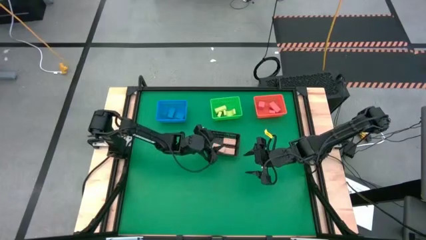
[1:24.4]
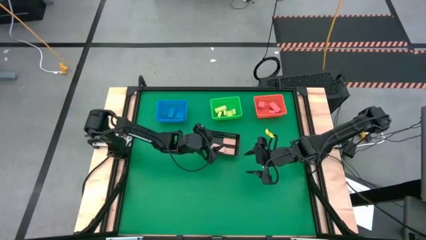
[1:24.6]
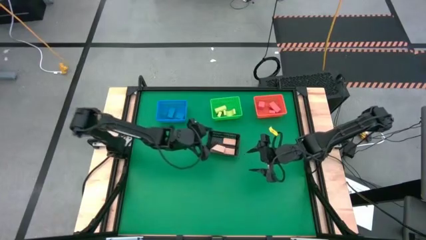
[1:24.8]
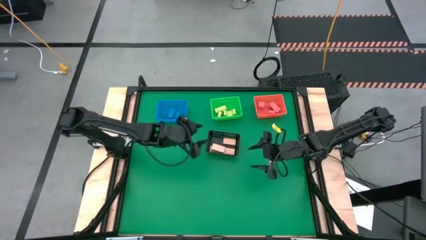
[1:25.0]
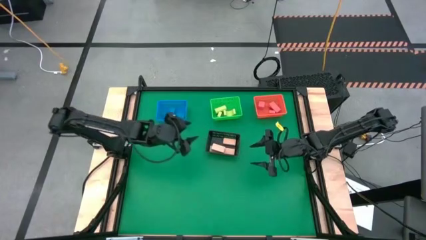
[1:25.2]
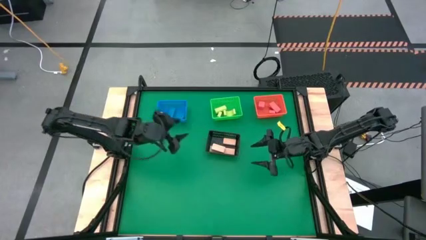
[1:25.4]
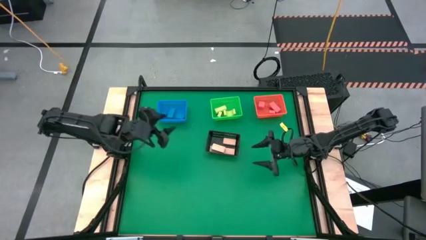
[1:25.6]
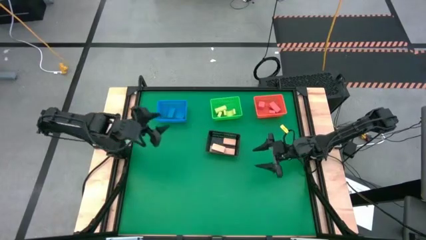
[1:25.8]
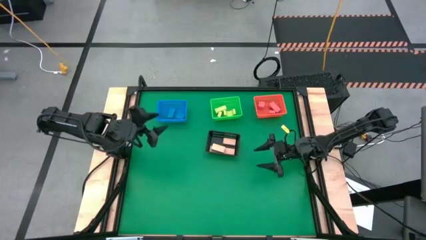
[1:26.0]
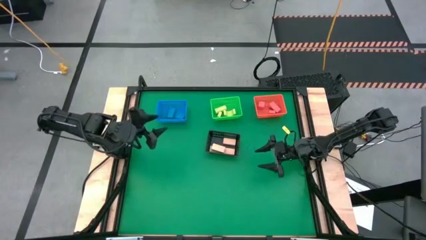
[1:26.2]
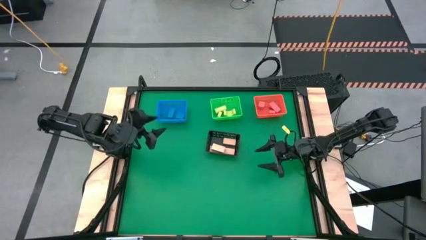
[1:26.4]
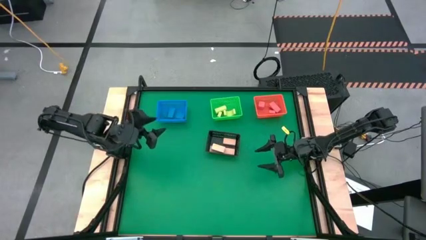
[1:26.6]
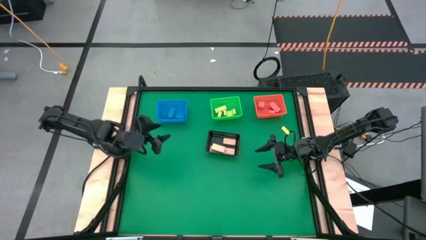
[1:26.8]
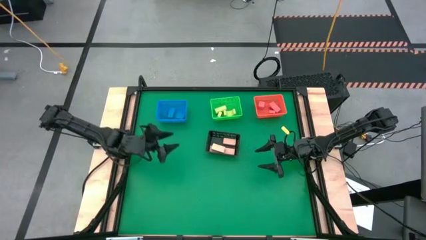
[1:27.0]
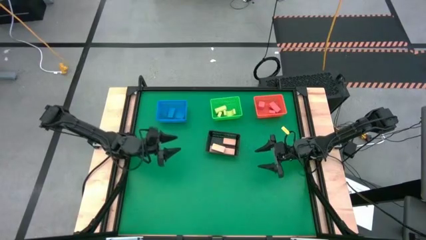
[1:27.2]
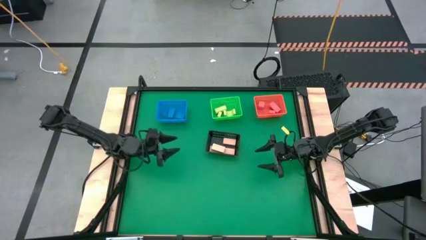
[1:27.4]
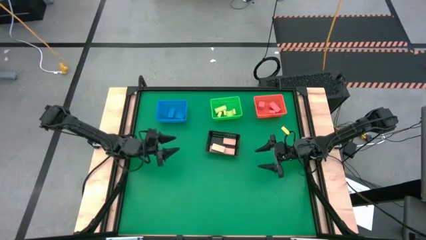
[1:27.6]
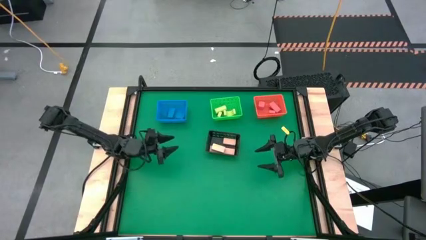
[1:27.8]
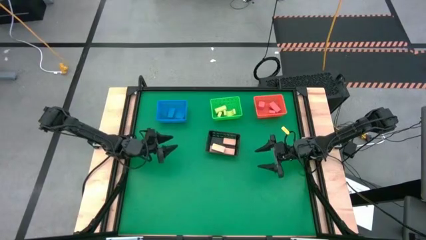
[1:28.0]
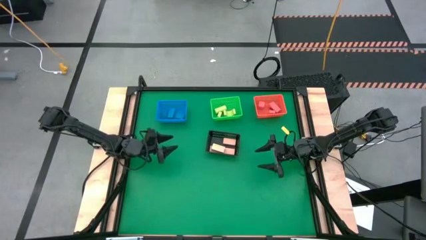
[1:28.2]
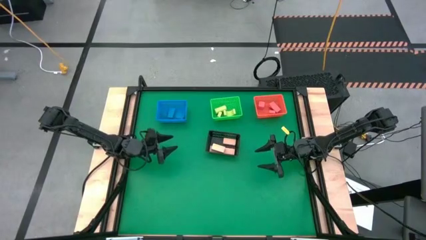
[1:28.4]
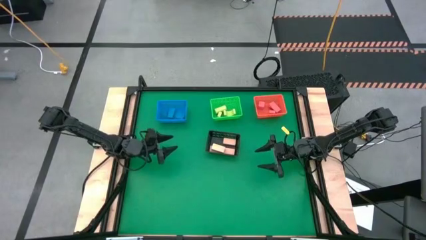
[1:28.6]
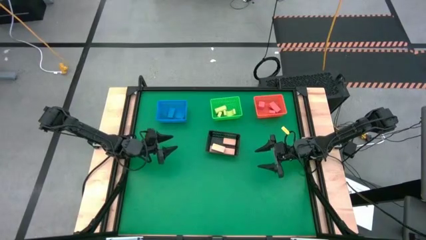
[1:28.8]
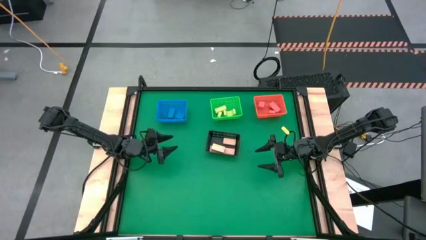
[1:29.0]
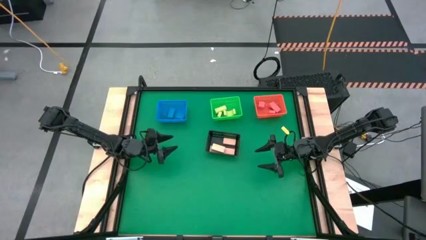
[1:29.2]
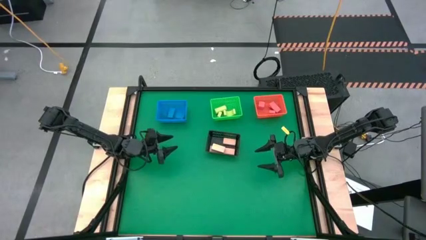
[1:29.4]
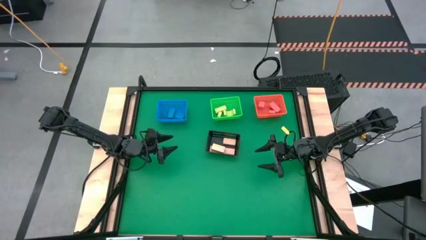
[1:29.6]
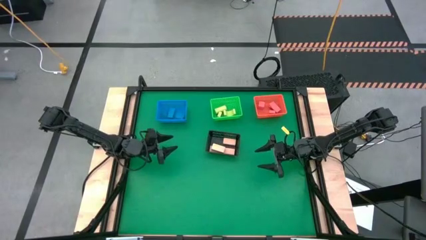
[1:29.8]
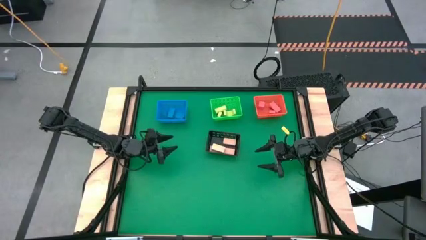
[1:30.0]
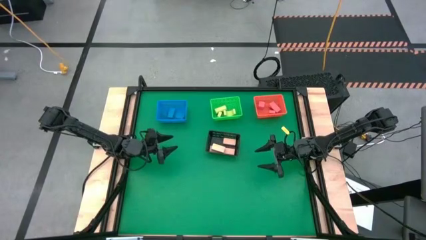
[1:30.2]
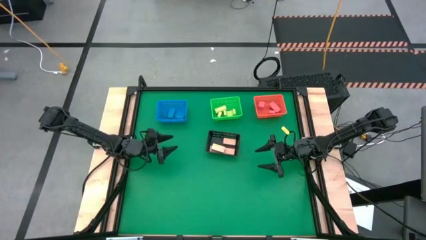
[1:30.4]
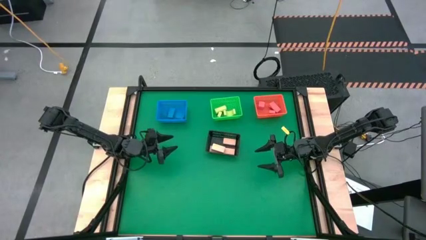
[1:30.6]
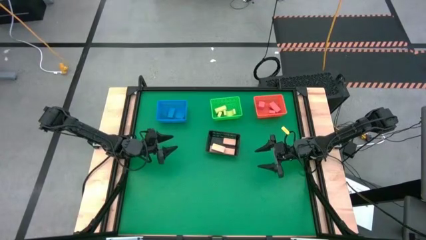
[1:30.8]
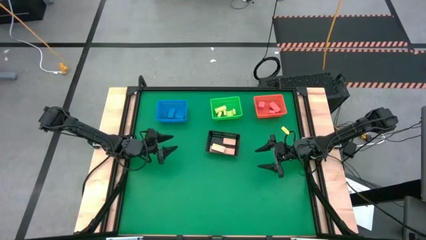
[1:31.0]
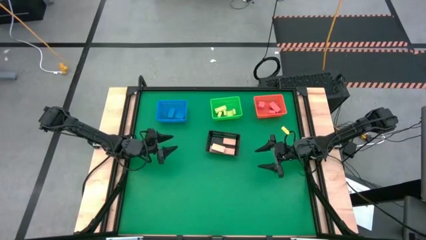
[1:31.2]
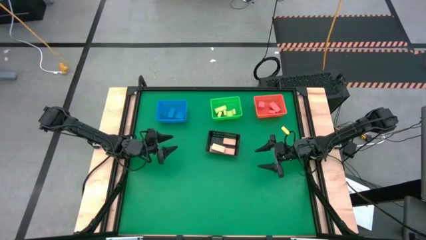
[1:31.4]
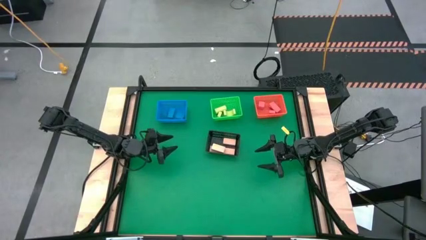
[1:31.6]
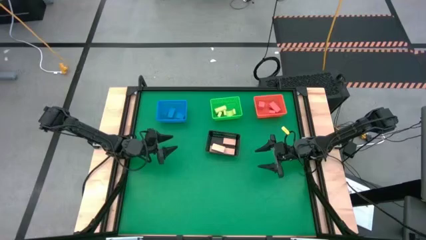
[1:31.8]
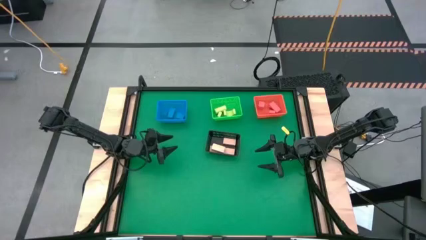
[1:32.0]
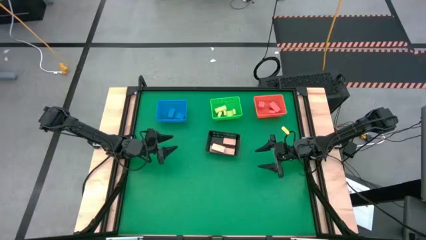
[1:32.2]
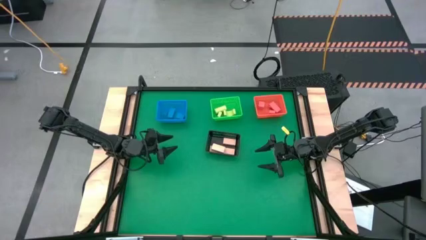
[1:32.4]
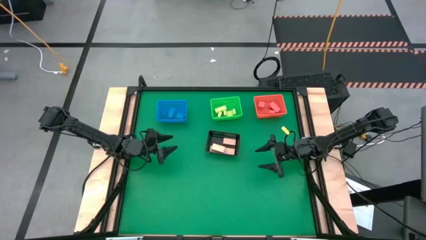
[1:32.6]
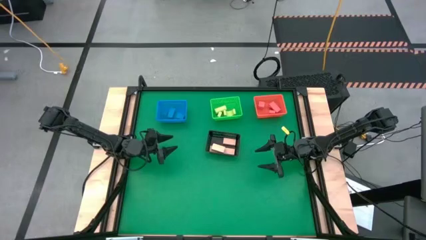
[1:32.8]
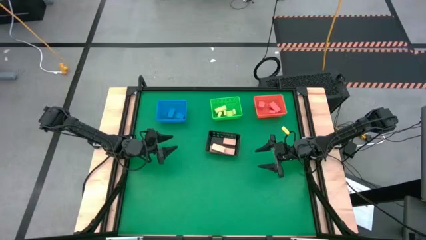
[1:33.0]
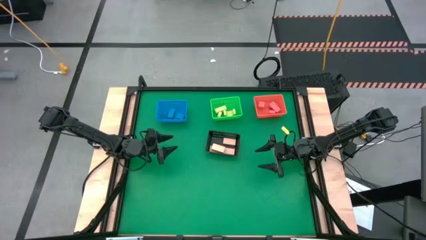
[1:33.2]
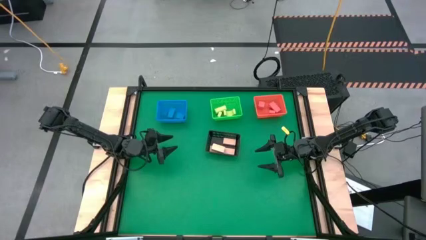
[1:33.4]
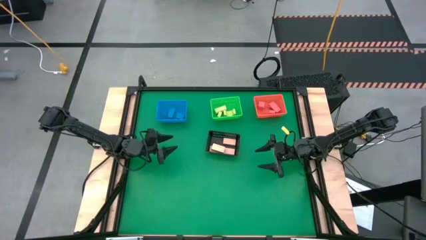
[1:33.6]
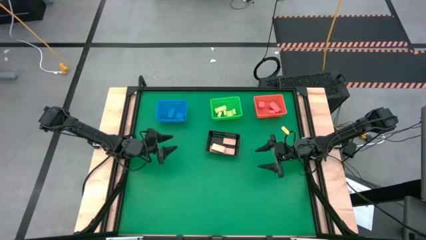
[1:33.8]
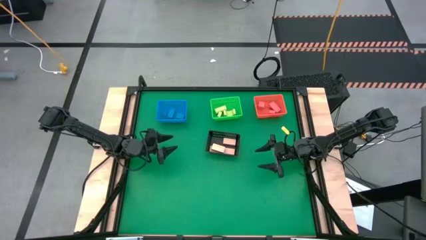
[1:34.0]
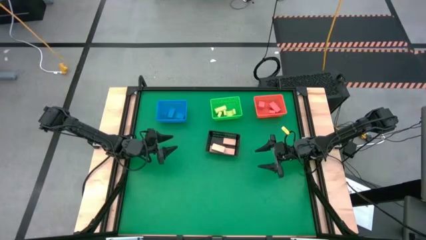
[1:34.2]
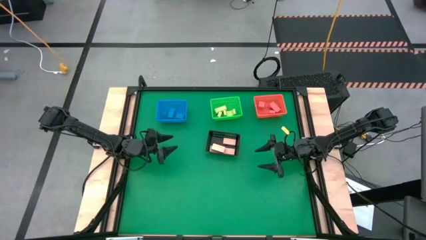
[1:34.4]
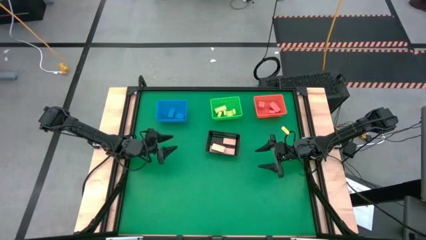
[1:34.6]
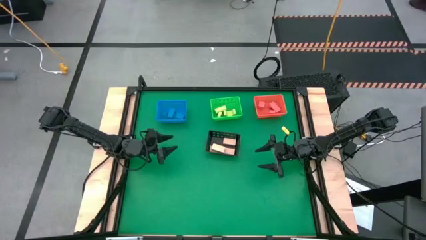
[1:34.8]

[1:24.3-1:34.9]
Task: Sort & place blocks by color
Return to Home Position

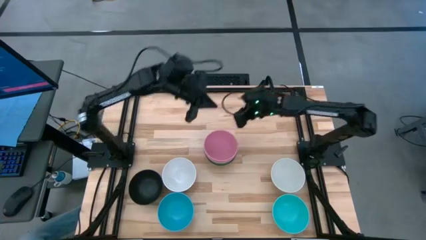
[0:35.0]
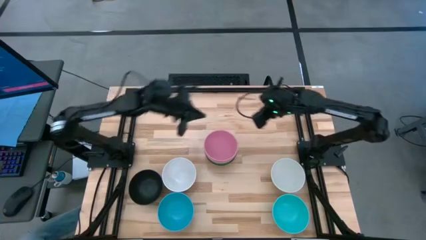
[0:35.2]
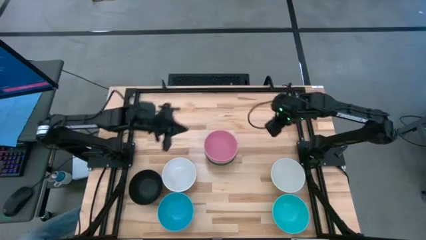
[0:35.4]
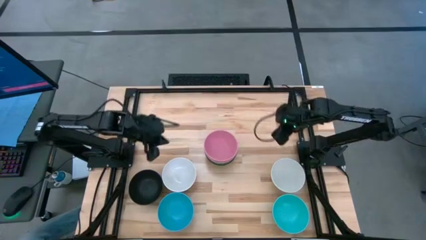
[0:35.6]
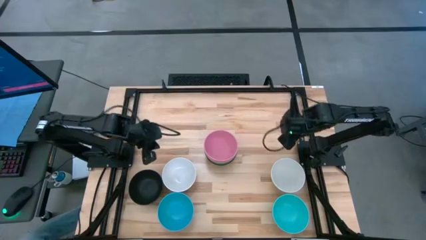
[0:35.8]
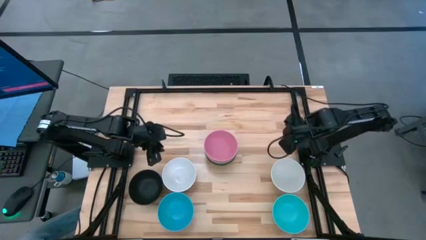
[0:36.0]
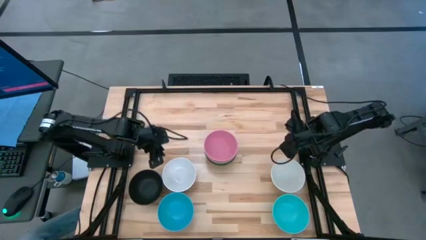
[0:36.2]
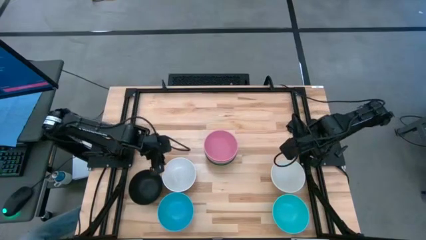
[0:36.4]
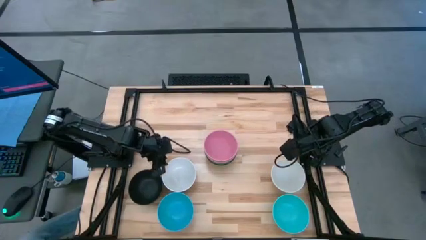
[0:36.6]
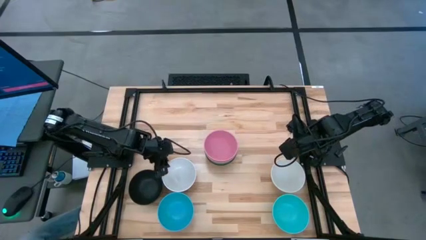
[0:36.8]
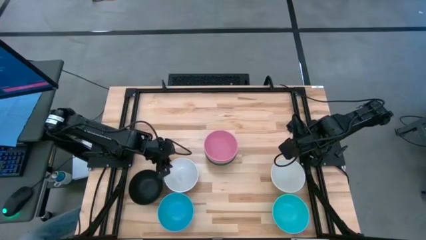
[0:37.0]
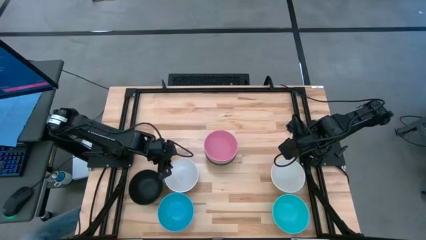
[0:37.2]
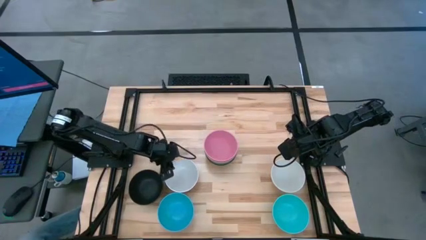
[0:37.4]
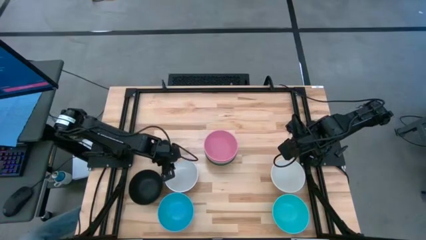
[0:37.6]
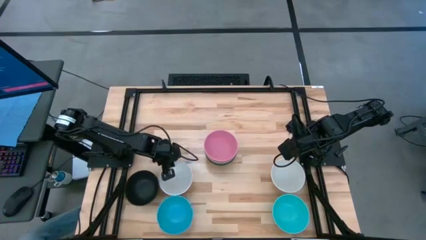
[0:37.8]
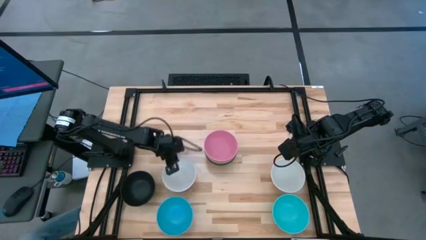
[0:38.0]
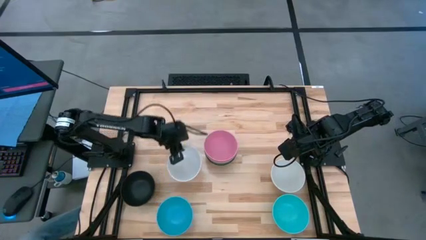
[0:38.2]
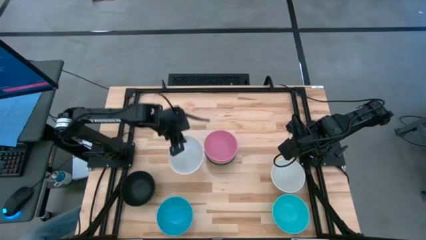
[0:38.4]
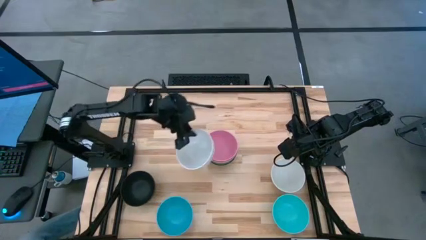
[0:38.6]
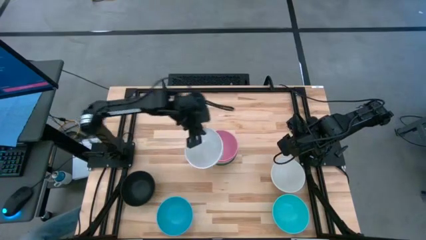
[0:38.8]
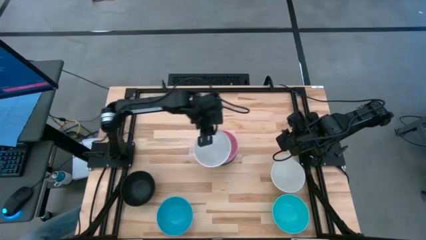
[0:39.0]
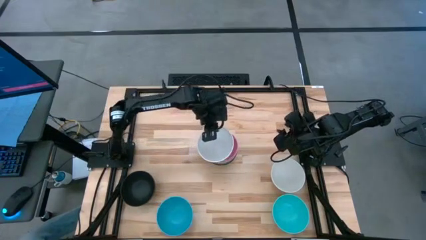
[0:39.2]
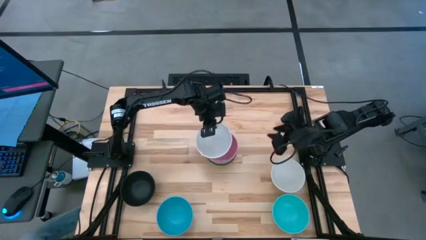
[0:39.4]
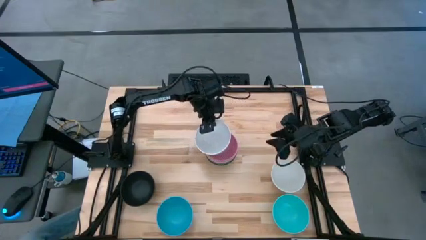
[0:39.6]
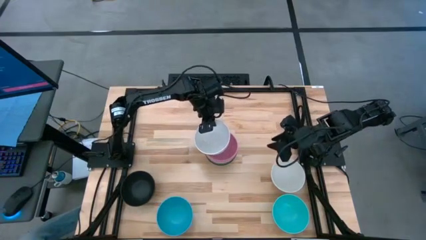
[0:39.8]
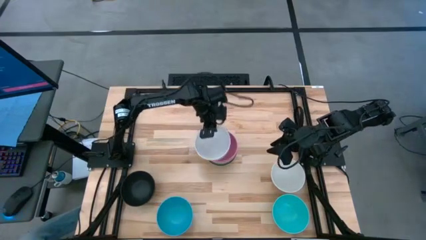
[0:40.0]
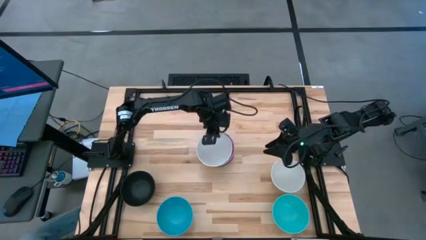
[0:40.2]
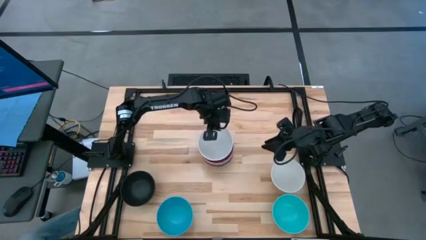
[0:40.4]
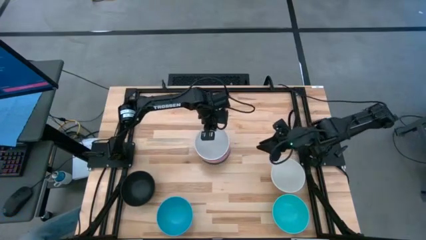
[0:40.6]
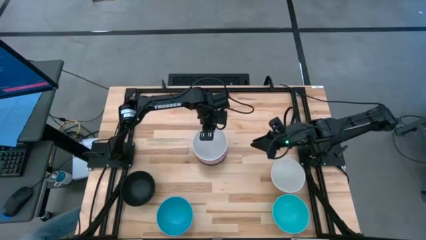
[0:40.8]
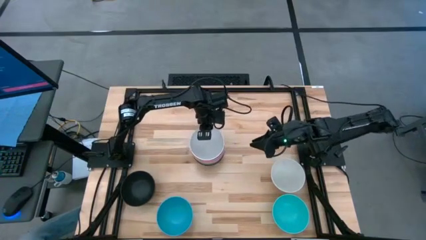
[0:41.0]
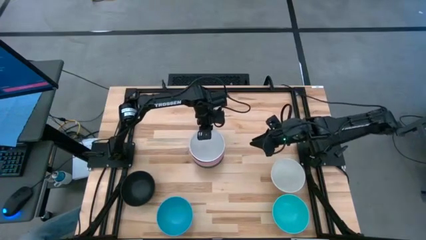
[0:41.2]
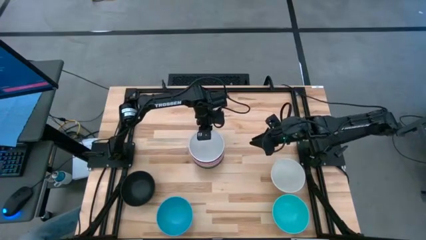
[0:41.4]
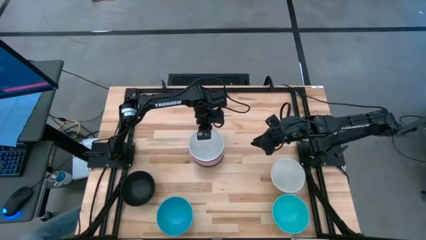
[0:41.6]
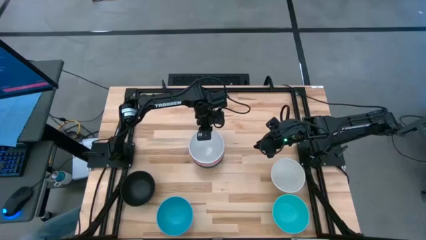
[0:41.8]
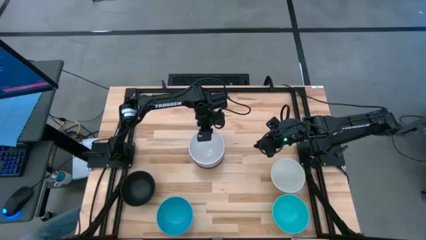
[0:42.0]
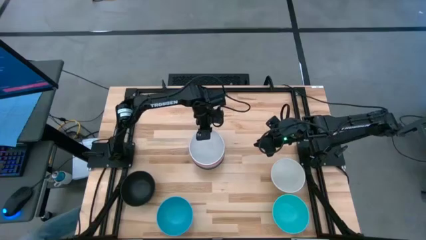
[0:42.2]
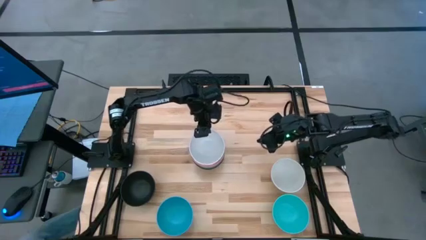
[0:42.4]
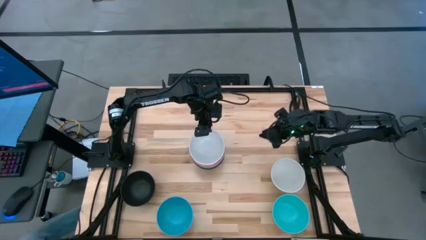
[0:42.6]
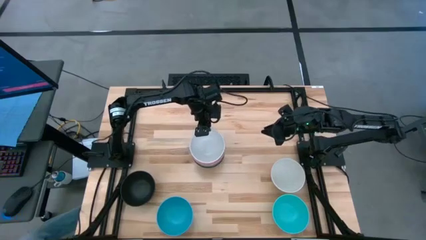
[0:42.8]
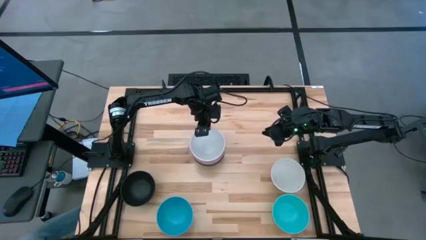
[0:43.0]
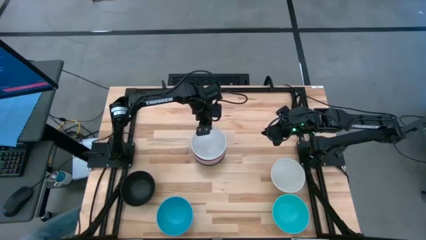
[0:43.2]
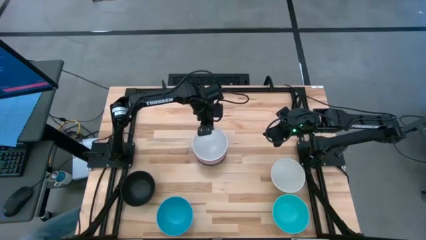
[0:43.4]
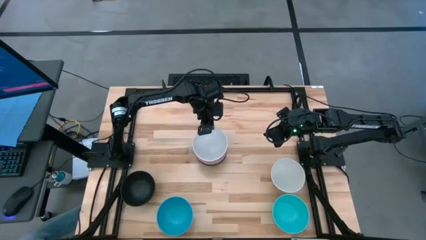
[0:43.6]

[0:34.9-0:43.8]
Task: Nest bowls inside each other
Stack the left white bowl on top of the pink bowl
